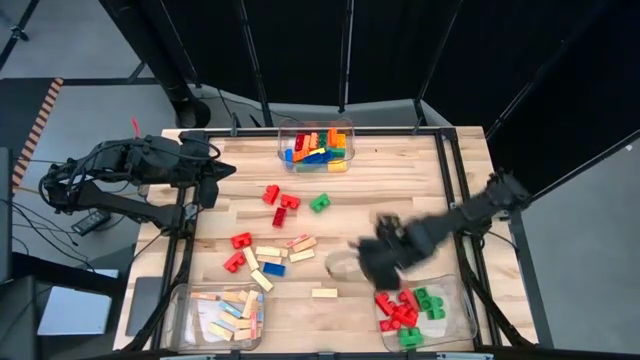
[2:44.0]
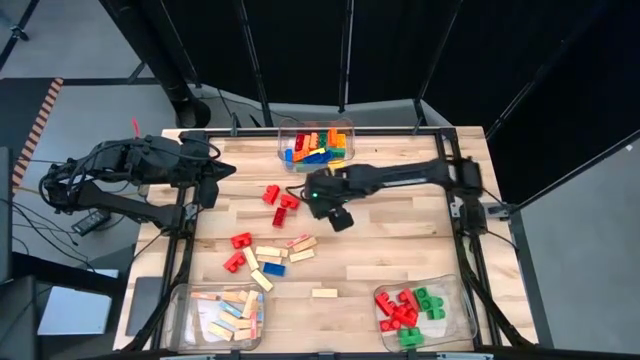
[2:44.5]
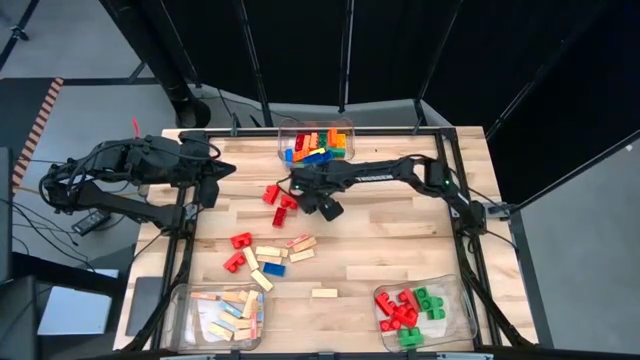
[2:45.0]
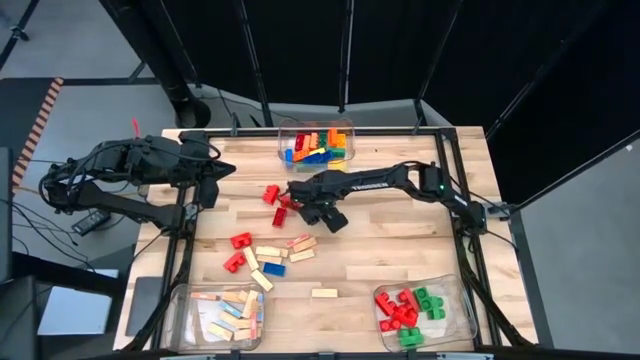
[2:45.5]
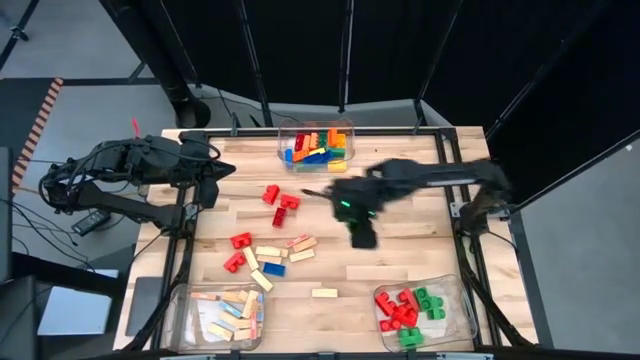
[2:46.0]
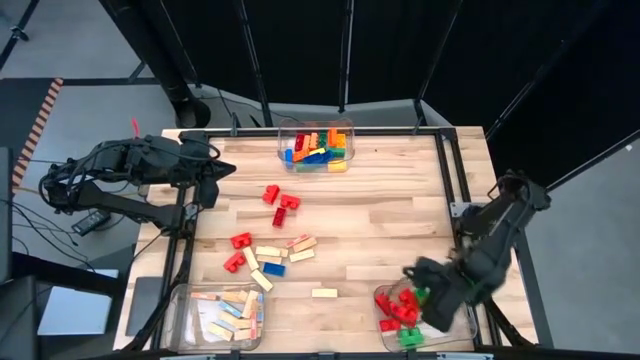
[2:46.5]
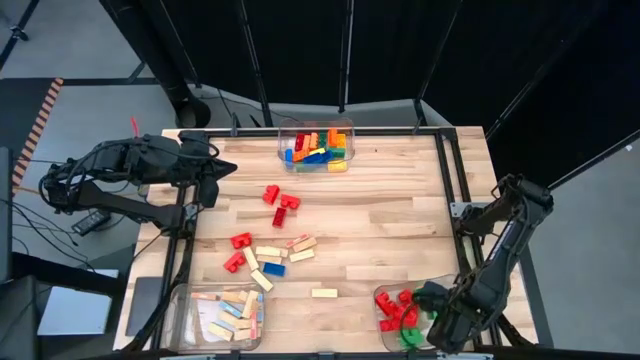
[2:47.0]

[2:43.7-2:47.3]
Task: Sort blocks by size
Put the 2-stud green game piece into the bottom right transparent bin

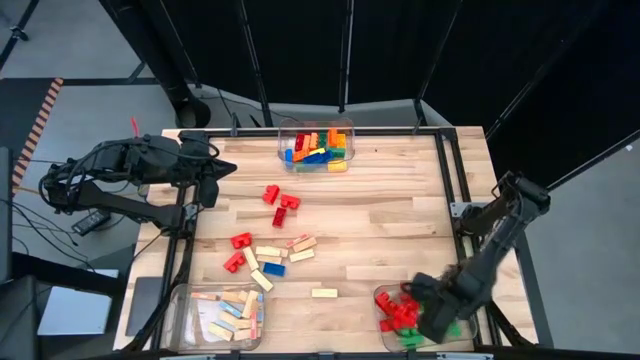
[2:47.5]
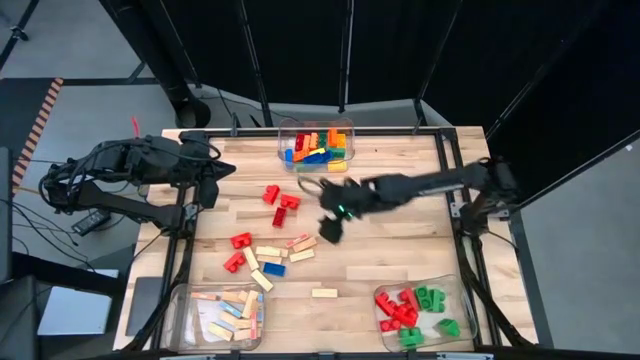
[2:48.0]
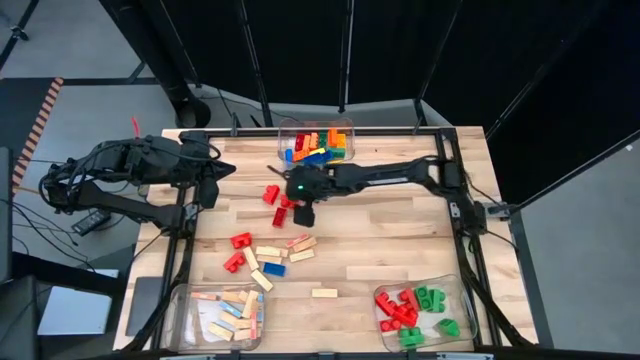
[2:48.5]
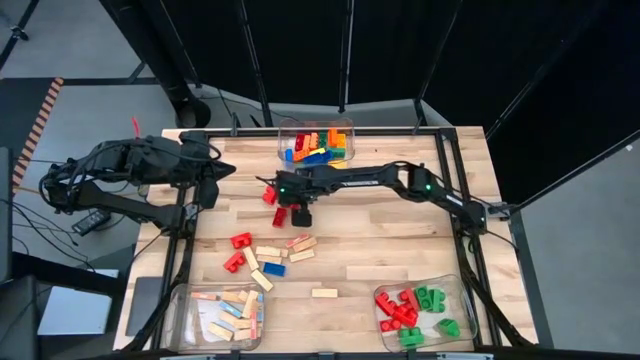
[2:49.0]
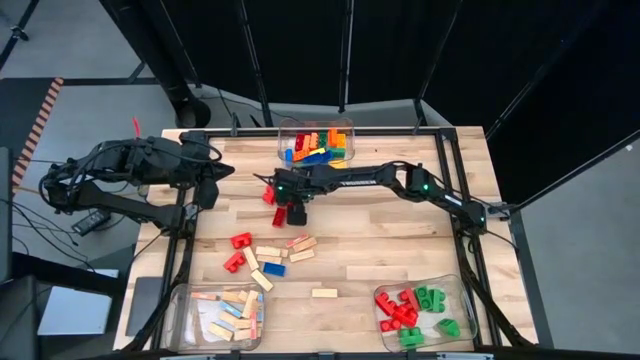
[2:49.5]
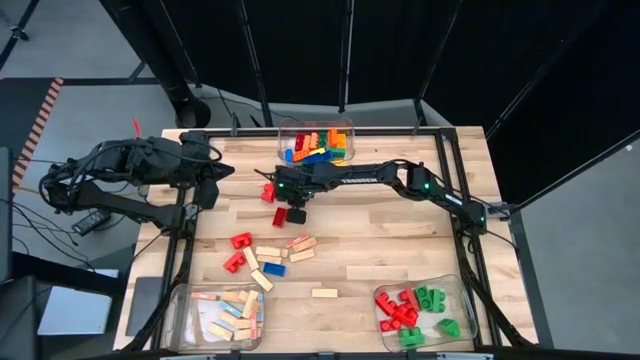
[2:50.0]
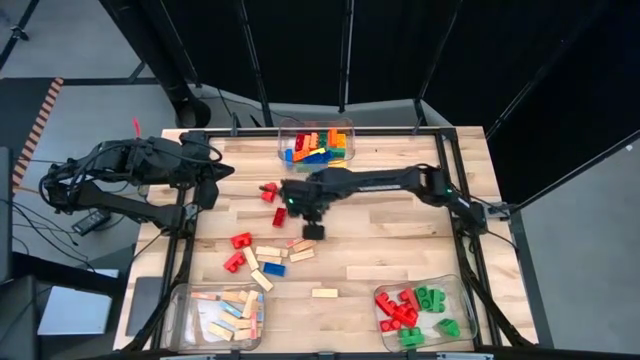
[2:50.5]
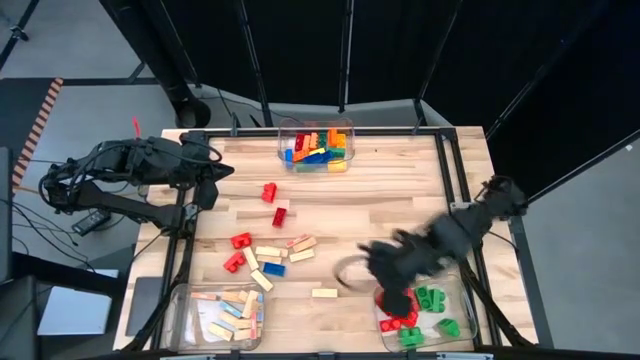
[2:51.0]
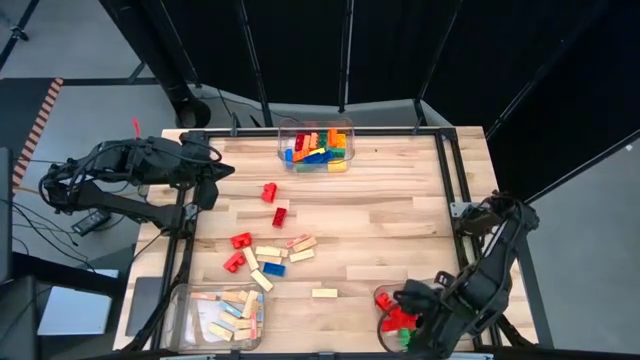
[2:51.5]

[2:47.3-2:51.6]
Put the 2-stud red game piece into the bottom right transparent bin

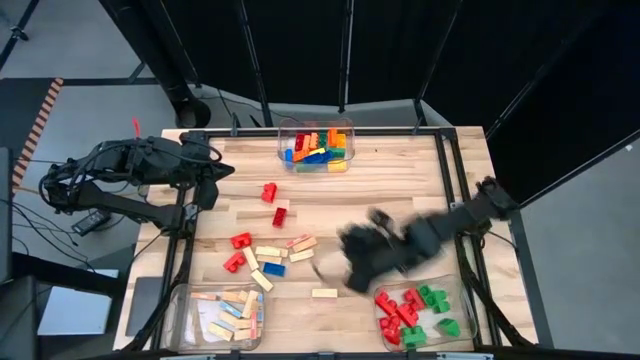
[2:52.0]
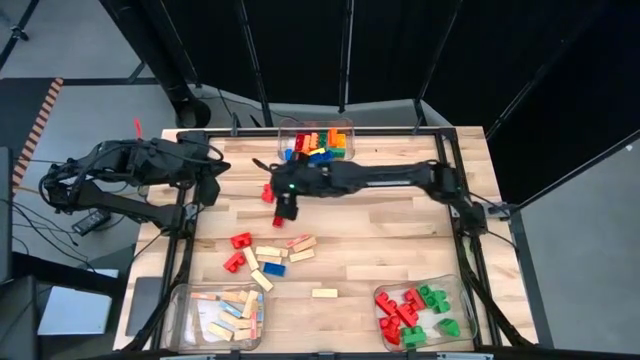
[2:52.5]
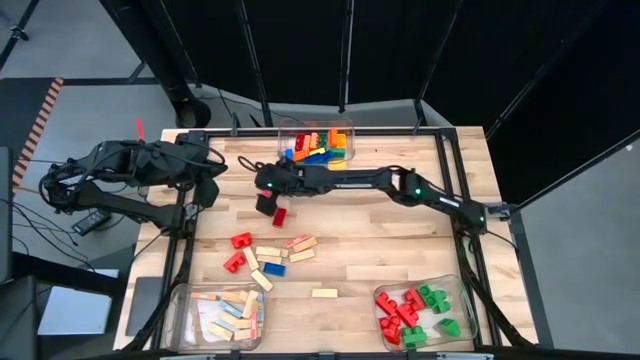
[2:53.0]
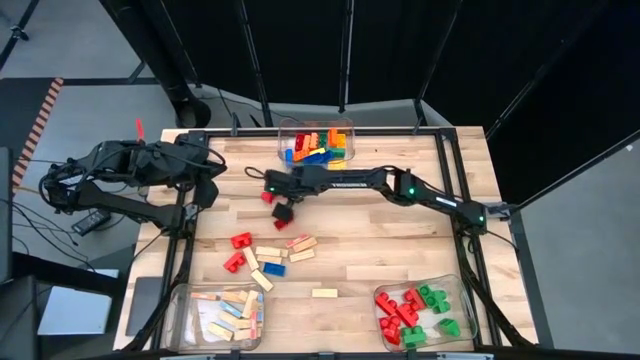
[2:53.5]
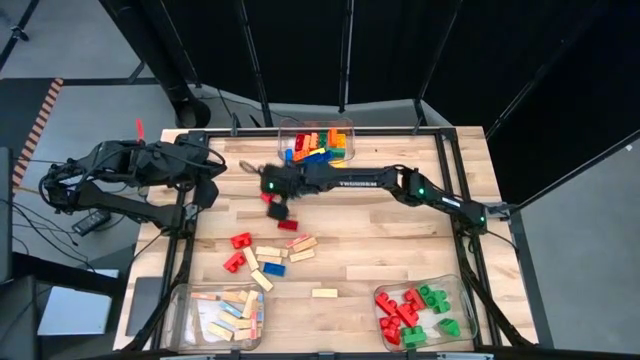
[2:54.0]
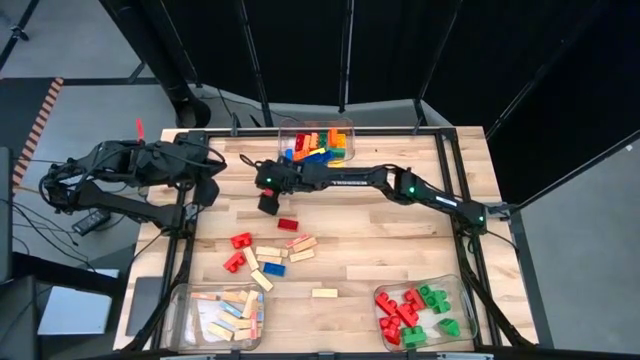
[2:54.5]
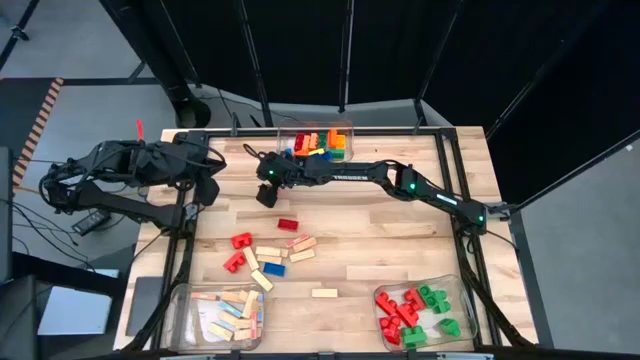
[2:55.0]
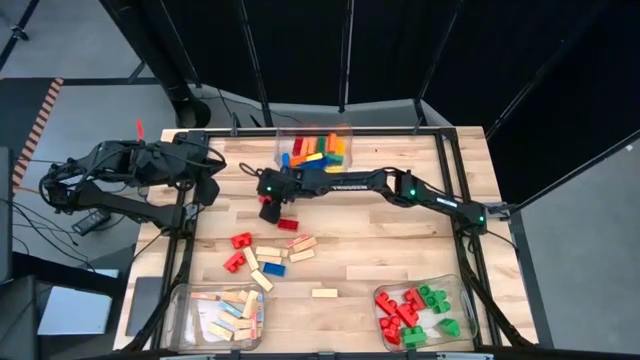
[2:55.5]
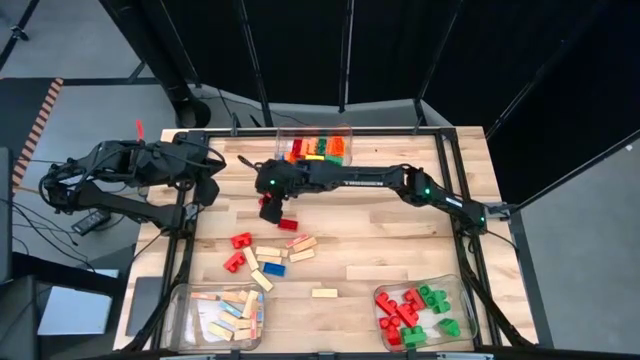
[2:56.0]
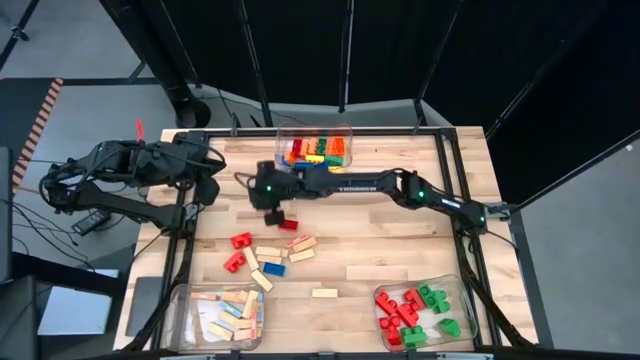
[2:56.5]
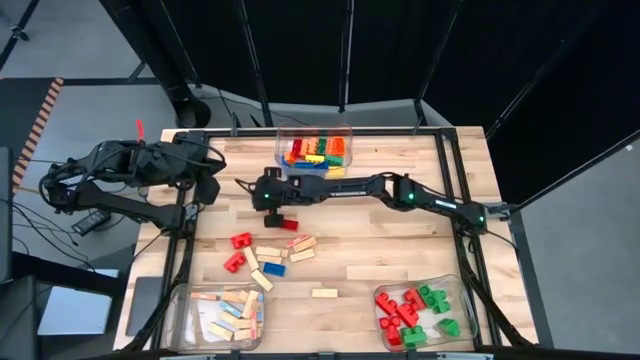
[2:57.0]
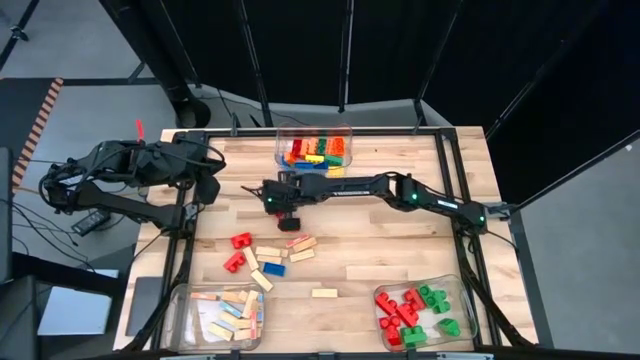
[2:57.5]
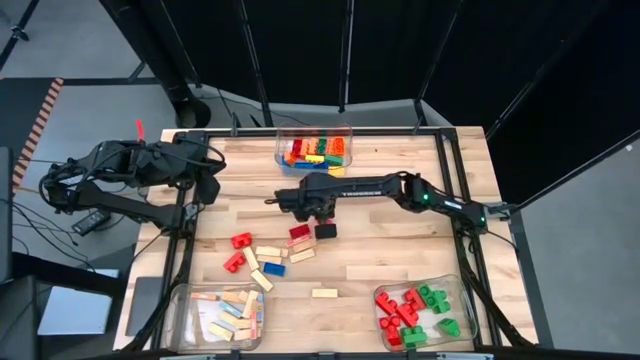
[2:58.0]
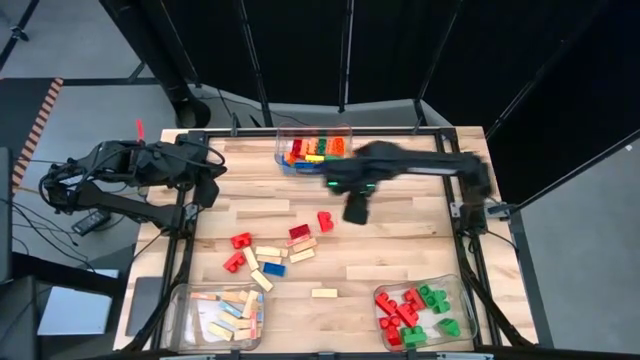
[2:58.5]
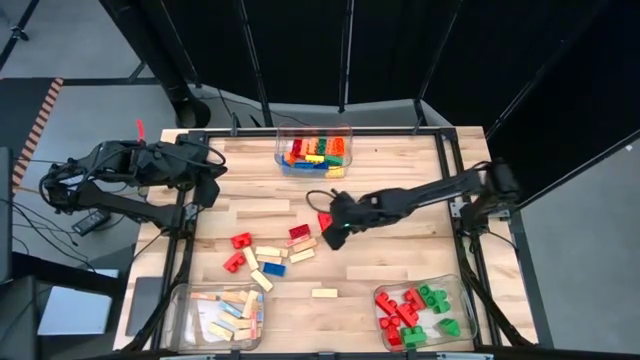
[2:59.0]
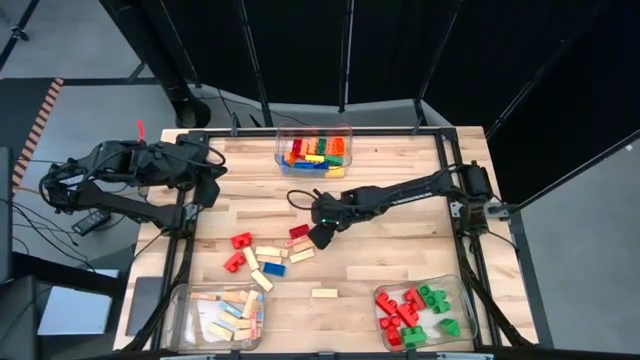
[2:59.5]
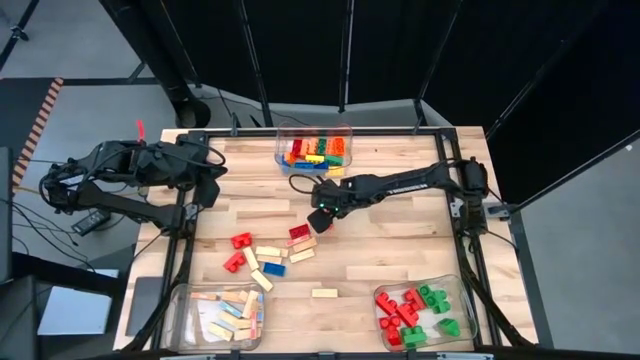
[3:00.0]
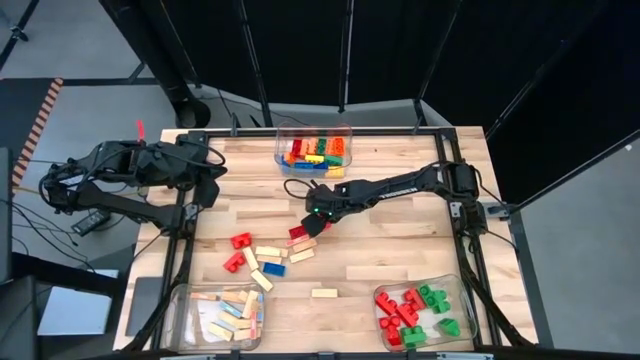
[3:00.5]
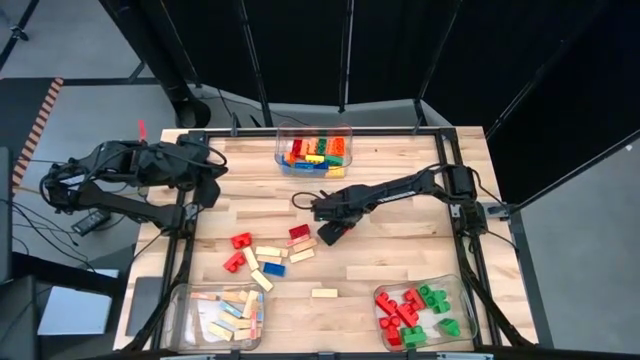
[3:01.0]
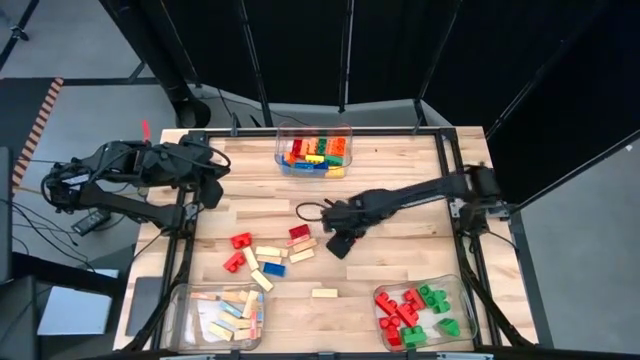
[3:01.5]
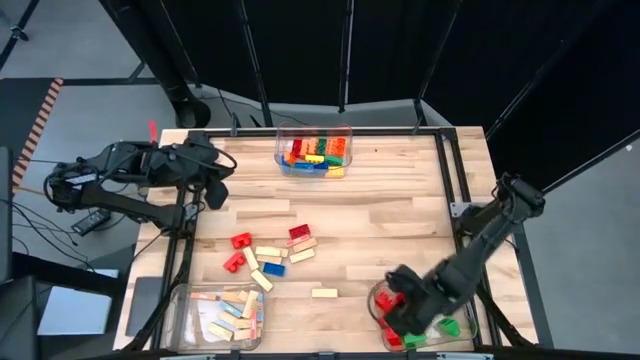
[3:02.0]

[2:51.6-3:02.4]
Put the 2-stud red game piece into the bottom right transparent bin

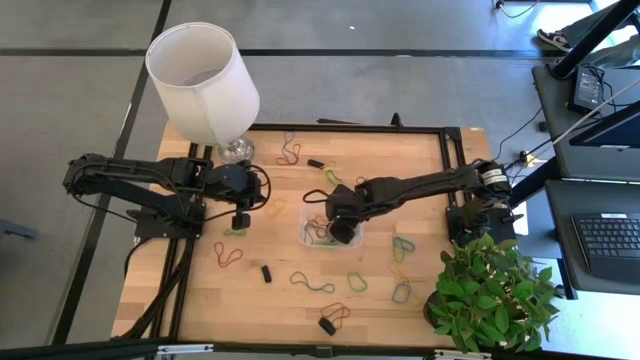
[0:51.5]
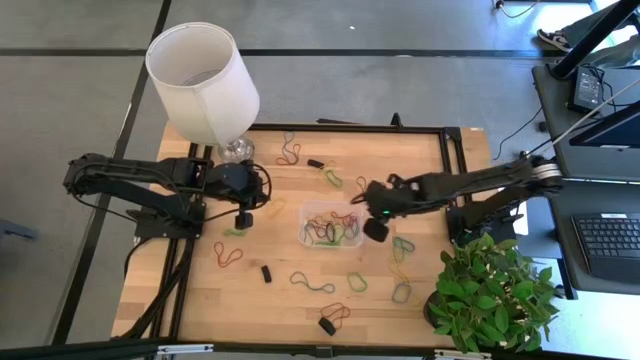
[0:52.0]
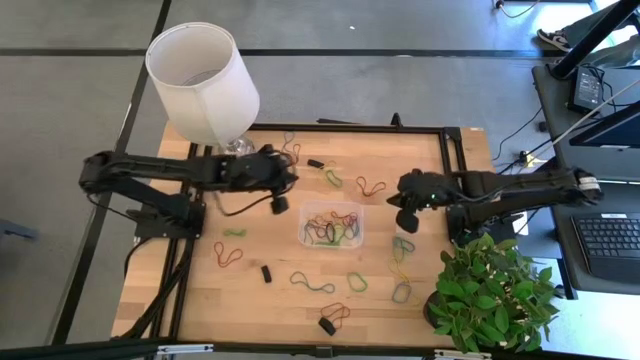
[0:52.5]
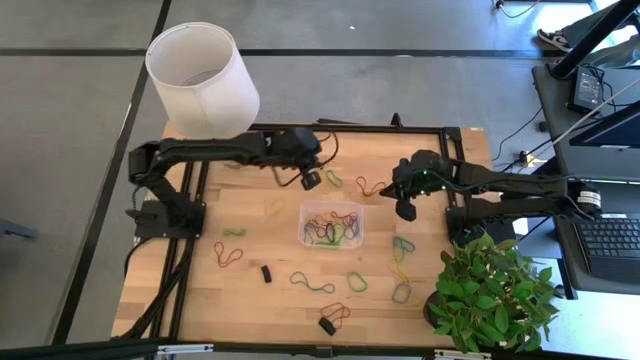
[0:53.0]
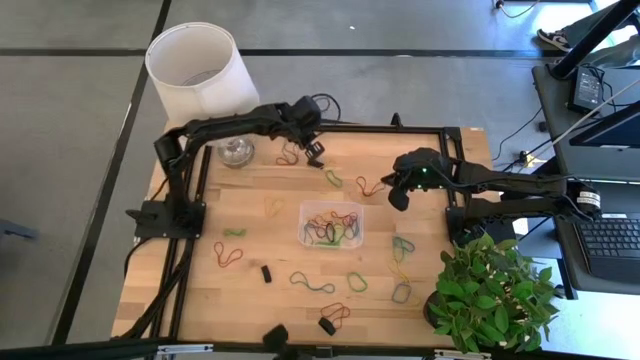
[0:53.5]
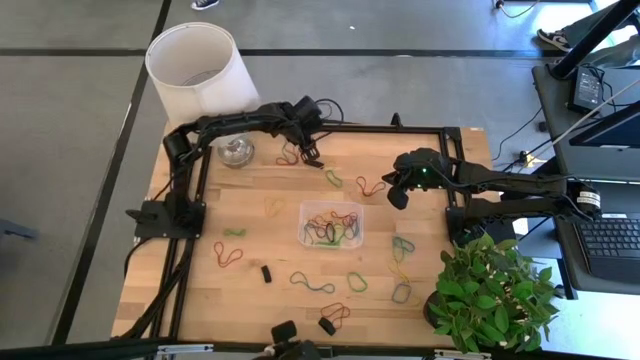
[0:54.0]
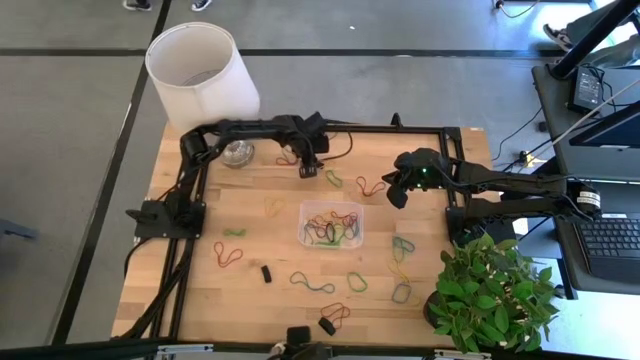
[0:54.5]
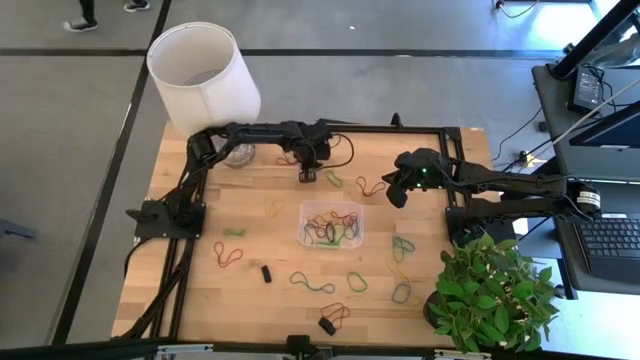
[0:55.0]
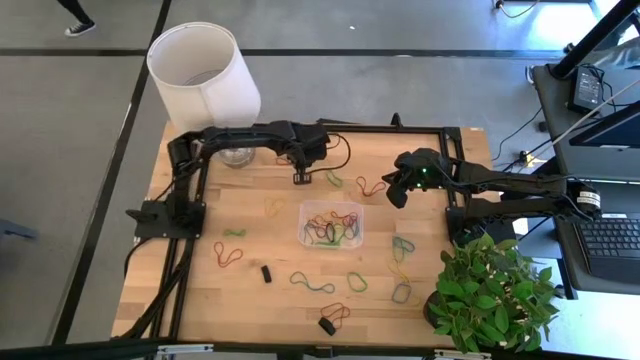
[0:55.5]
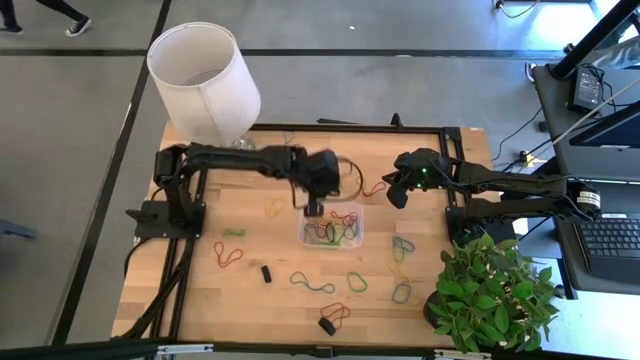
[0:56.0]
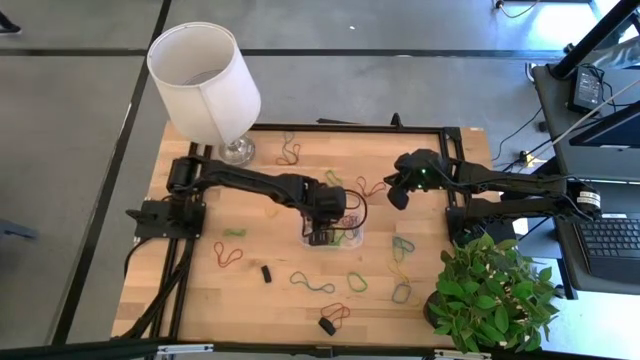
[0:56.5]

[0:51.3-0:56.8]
Task: Pick and place rubber bands into bin
Put the black rubber band into the transparent bin
